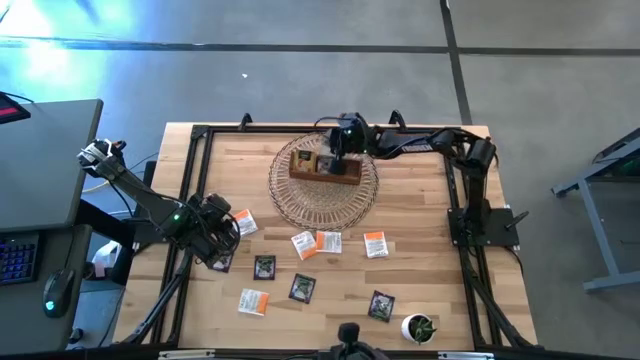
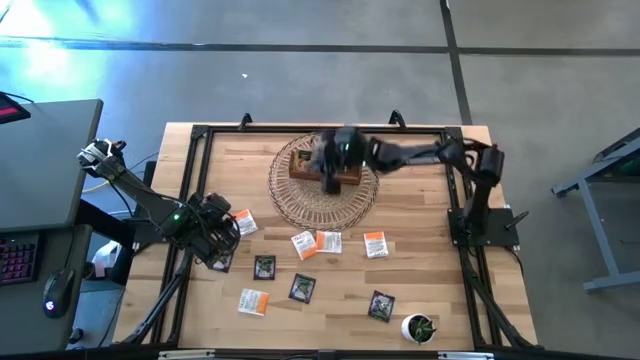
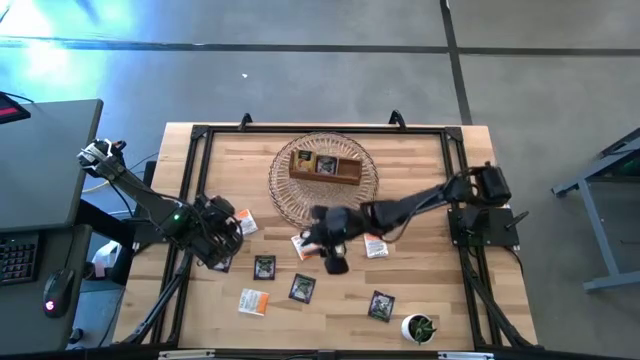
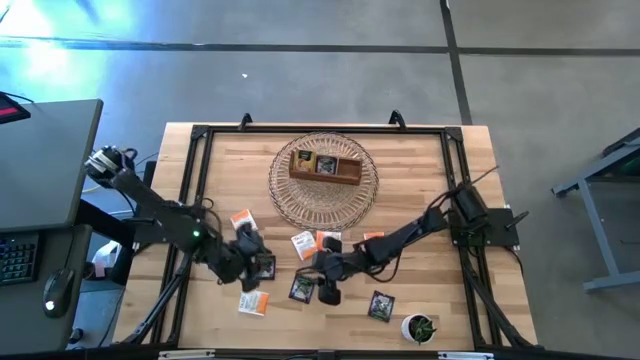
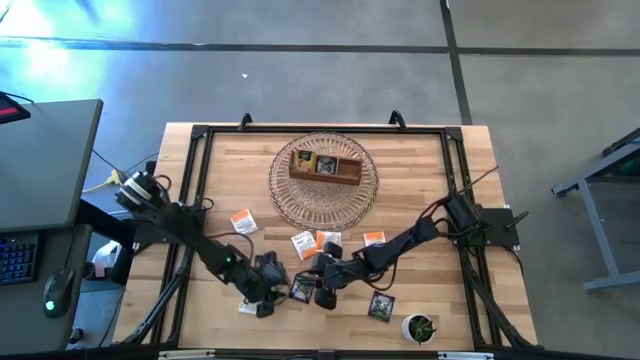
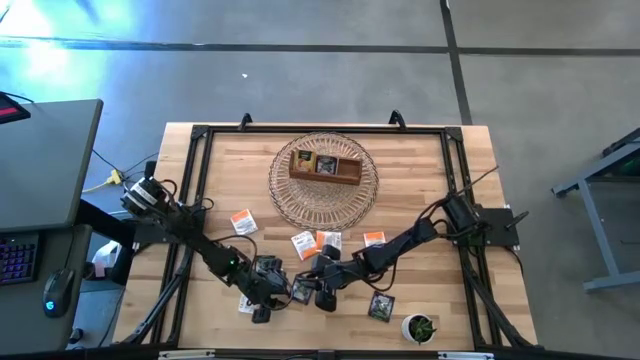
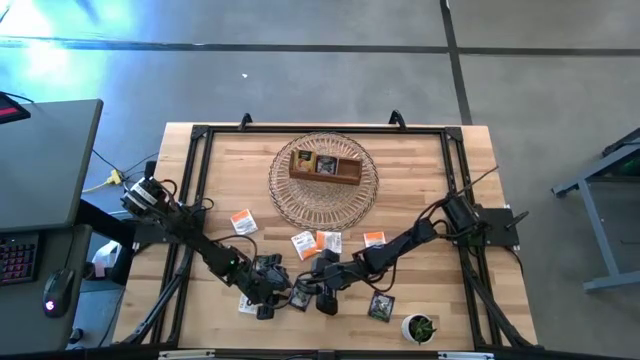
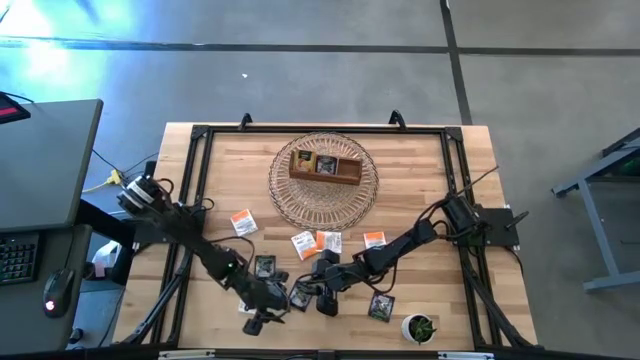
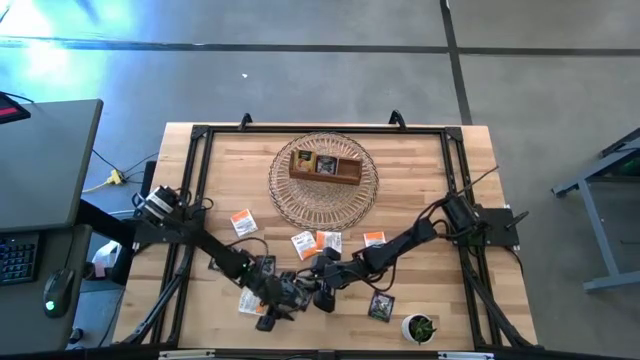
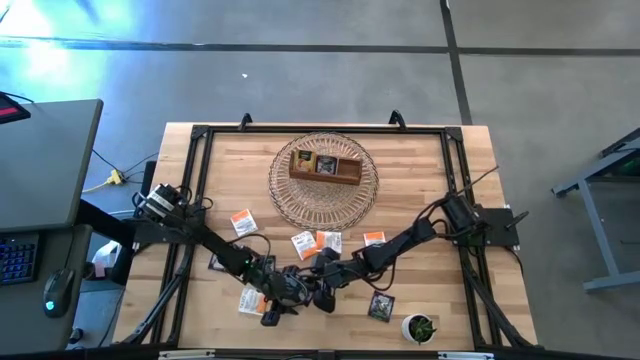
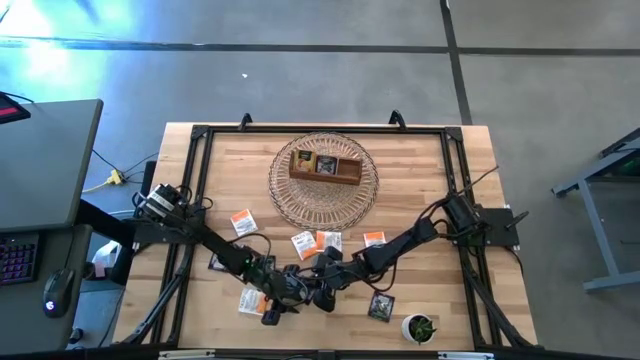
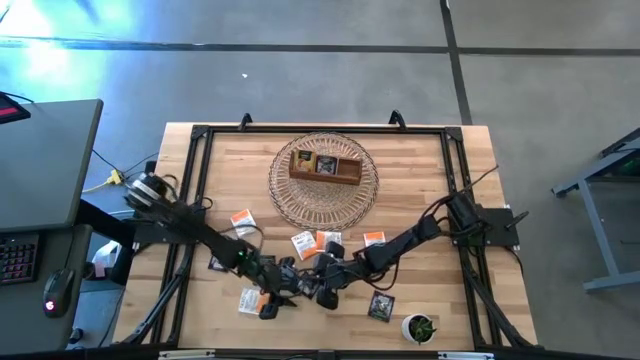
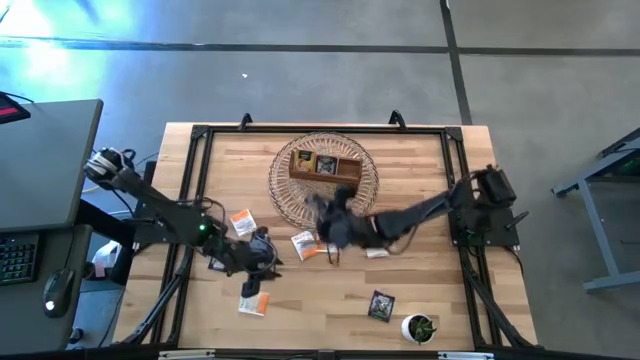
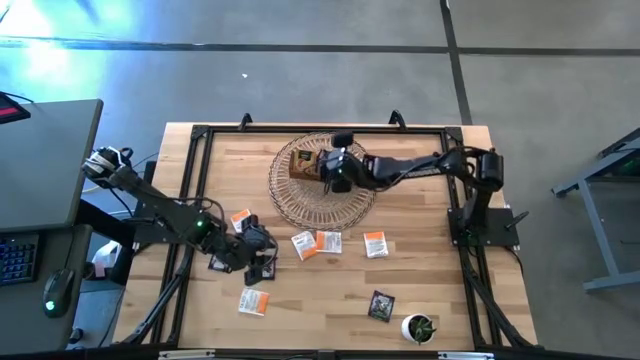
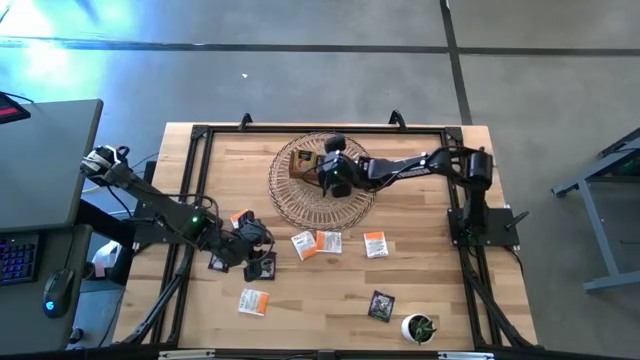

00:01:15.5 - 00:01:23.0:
Task: Pick & Place Tea
Put the black tea bag into the middle section of the wooden organizer

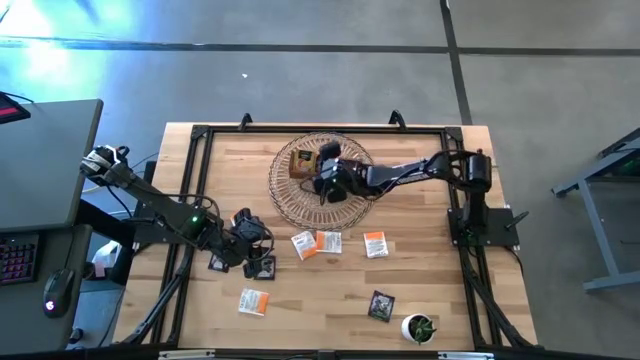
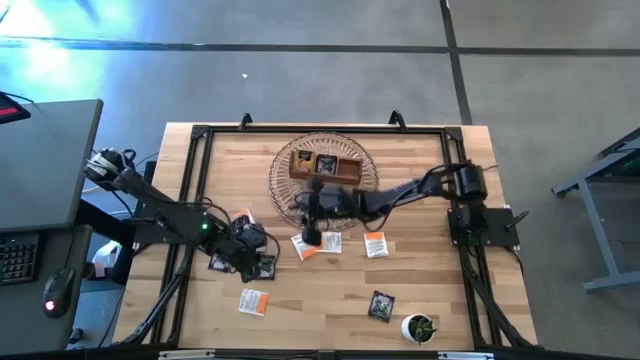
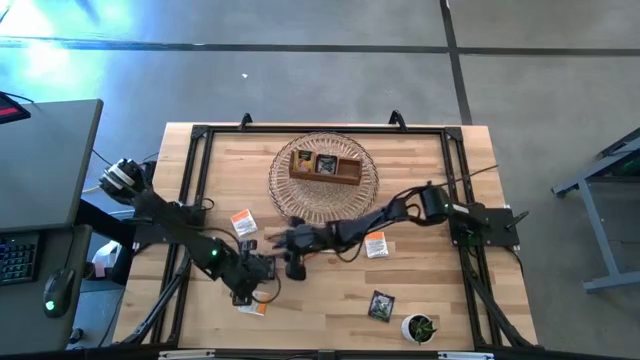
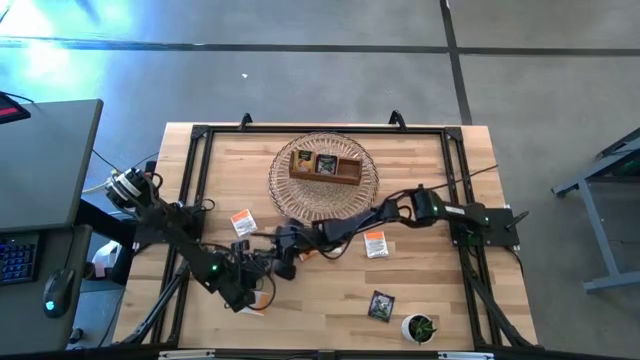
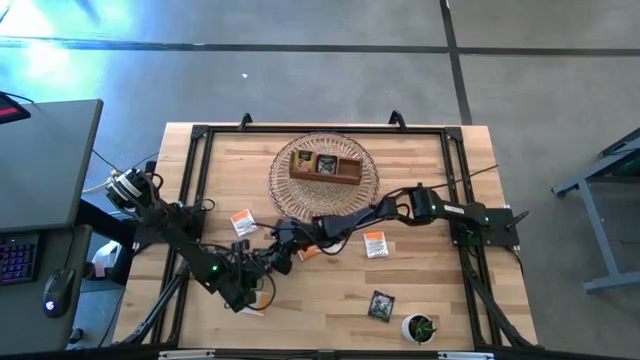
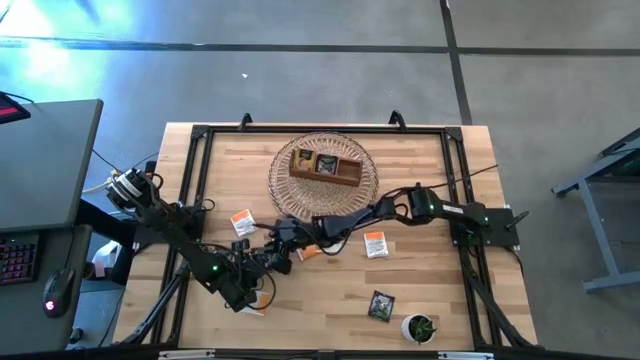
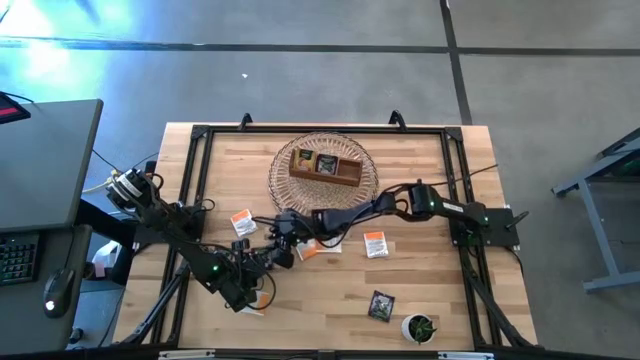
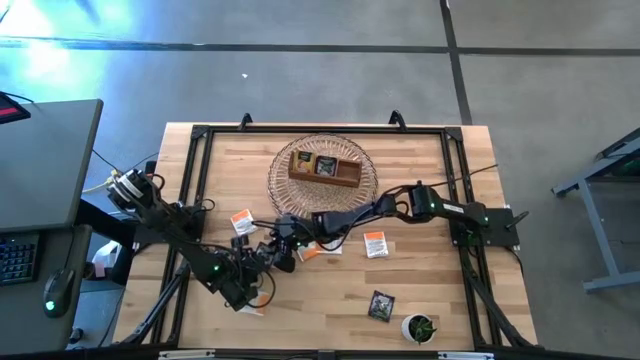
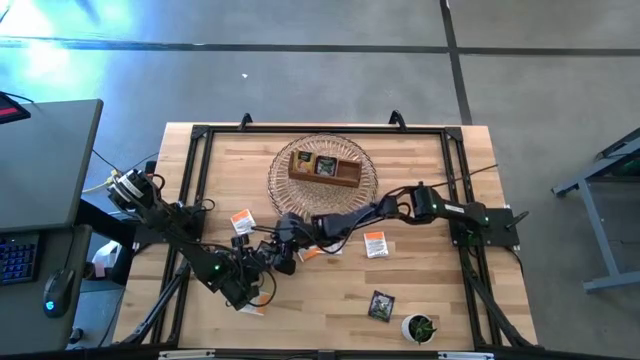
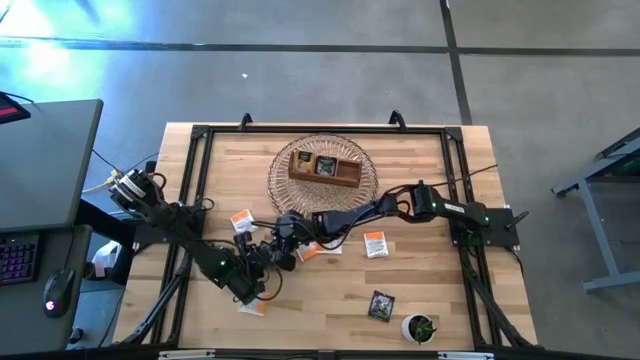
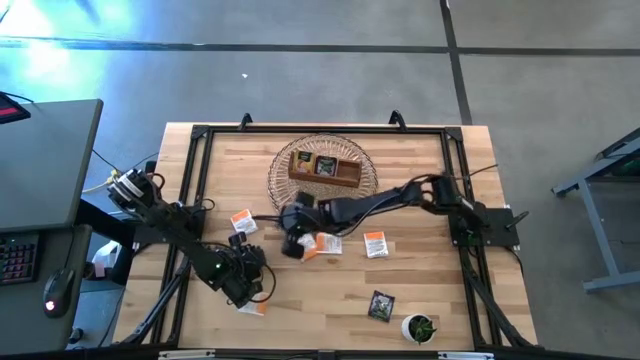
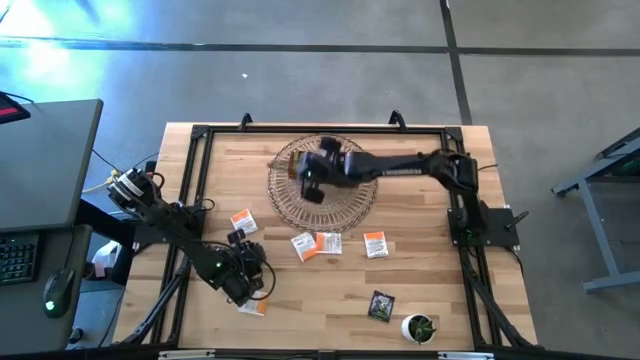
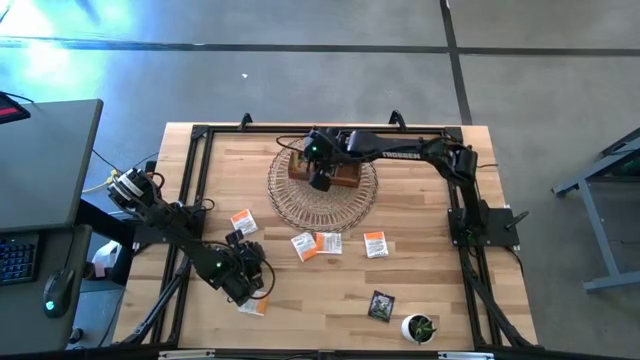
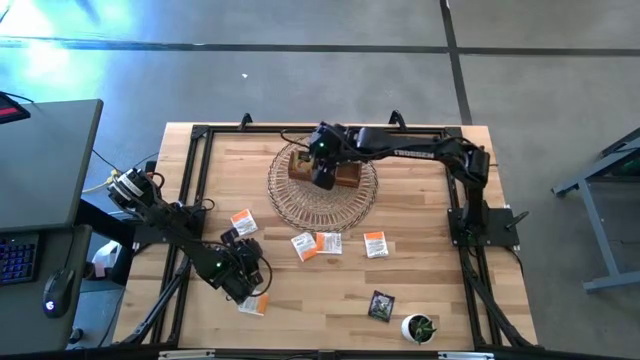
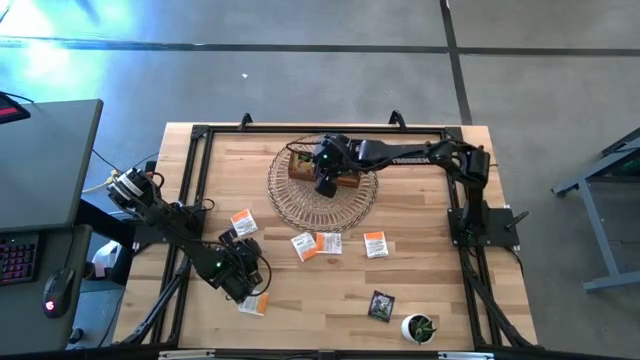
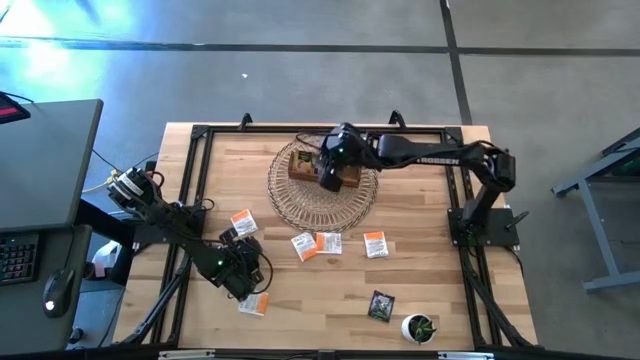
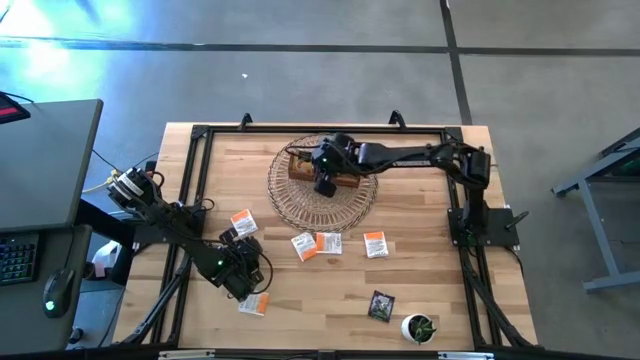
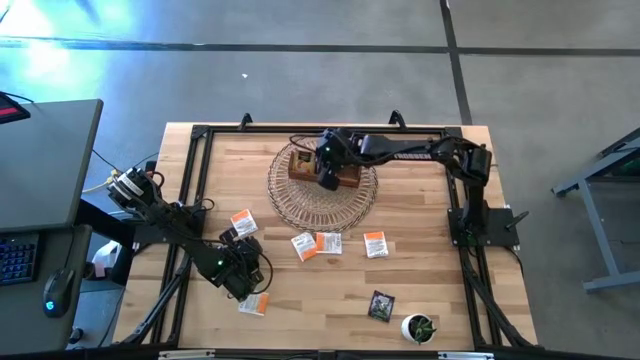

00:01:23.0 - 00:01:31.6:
Put the black tea bag into the middle section of the wooden organizer

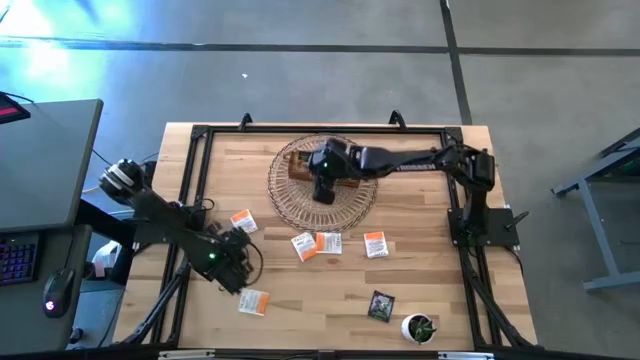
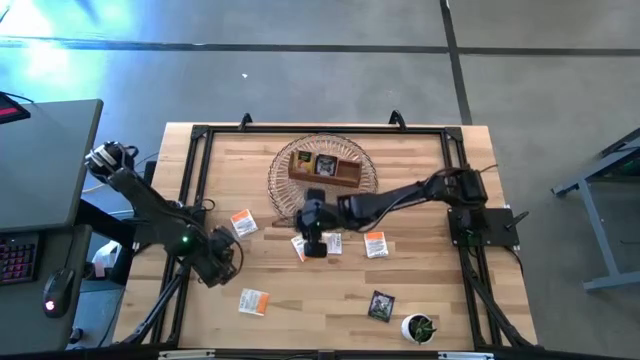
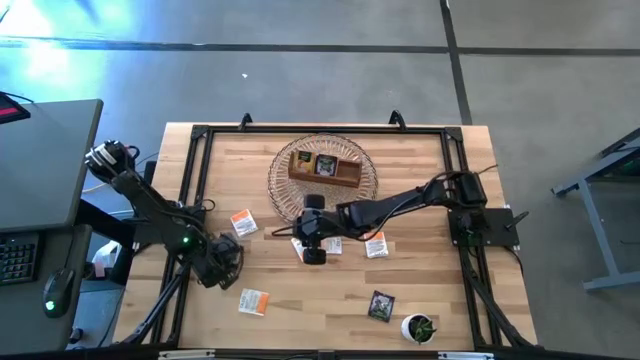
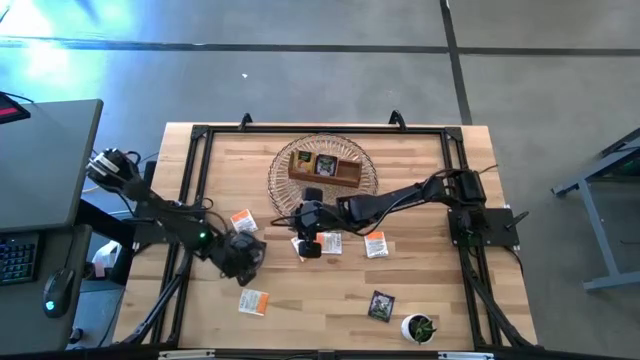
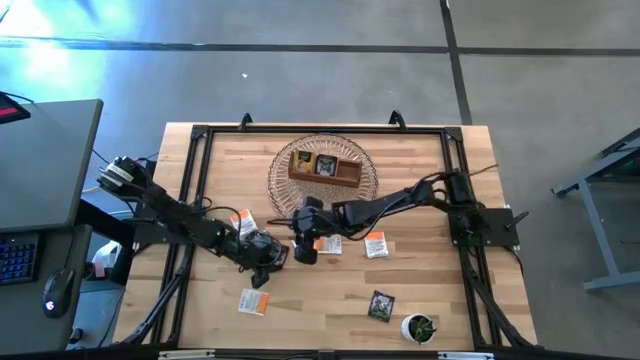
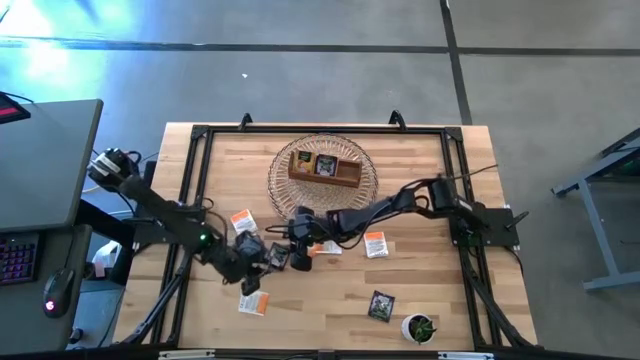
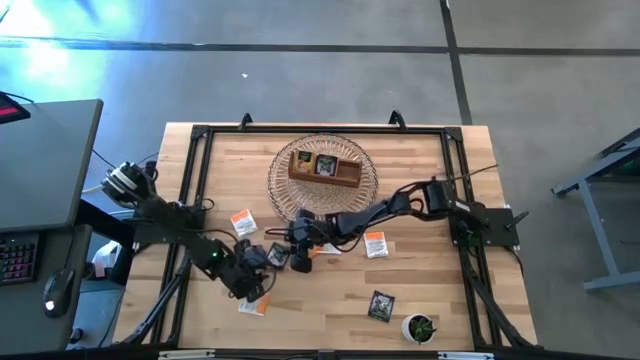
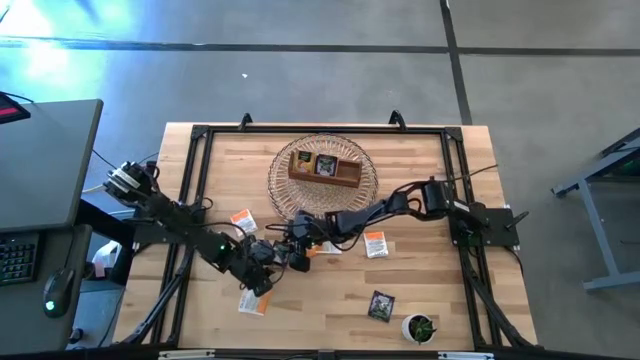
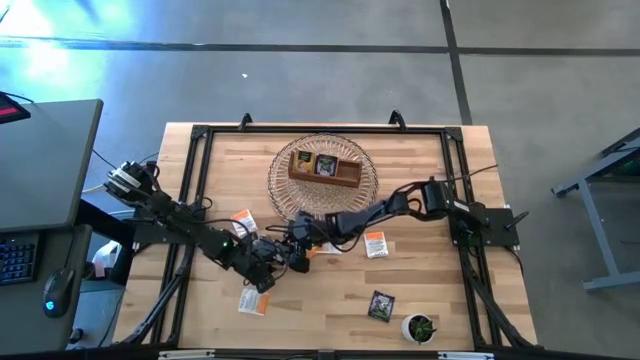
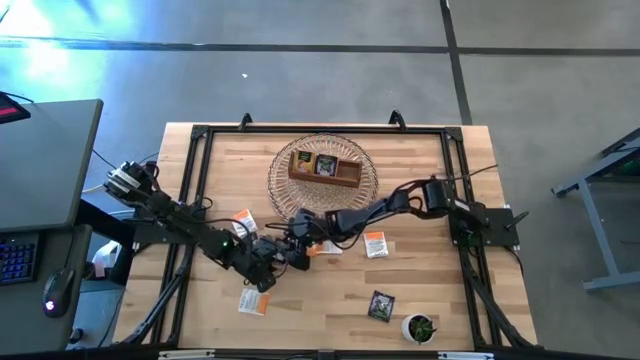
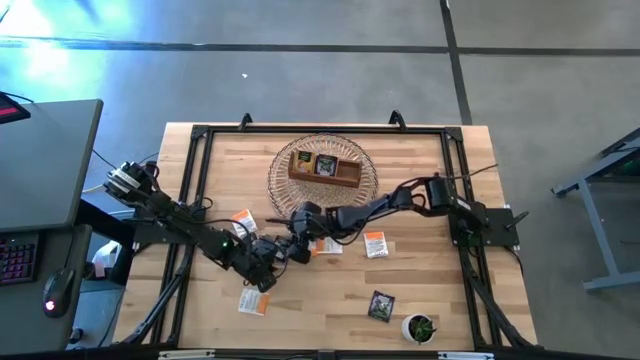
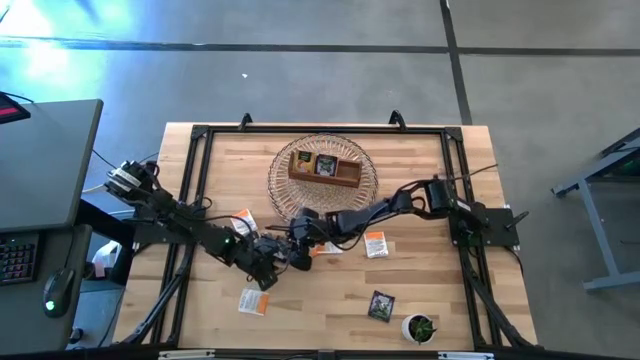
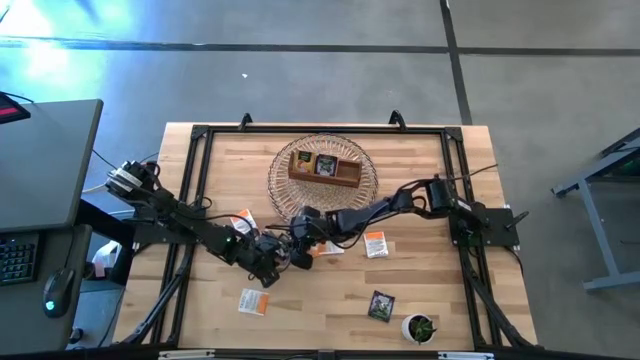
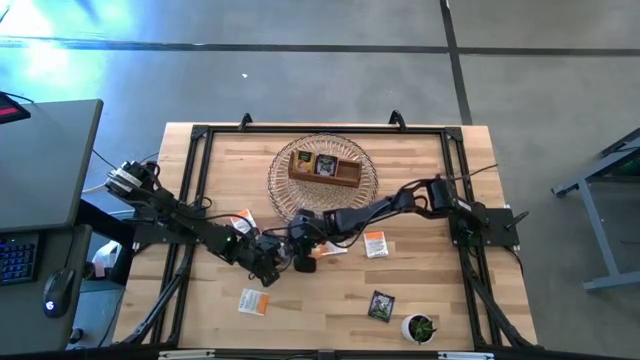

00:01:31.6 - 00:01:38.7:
Put the black tea bag into the middle section of the wooden organizer
